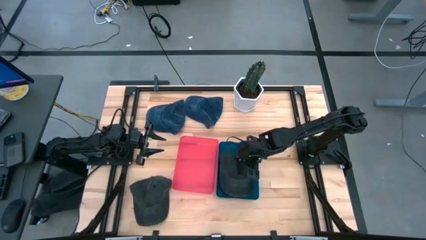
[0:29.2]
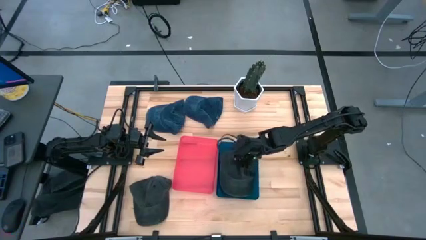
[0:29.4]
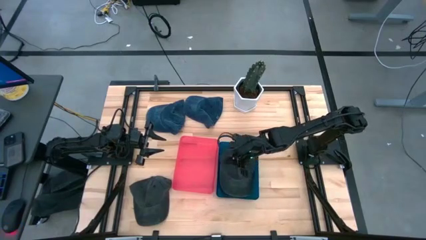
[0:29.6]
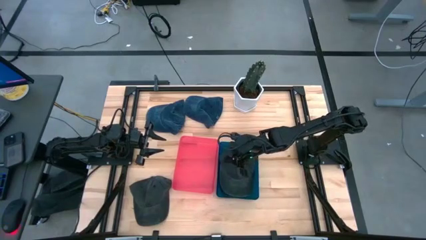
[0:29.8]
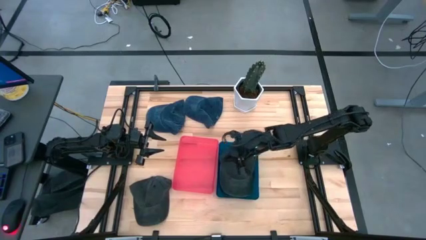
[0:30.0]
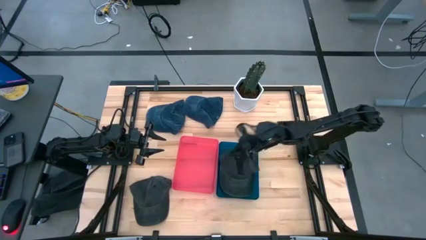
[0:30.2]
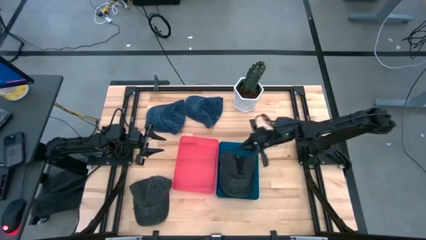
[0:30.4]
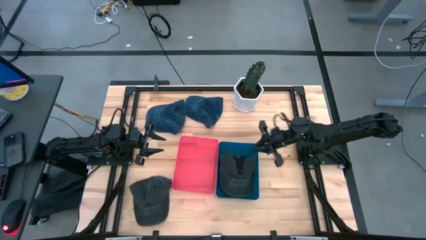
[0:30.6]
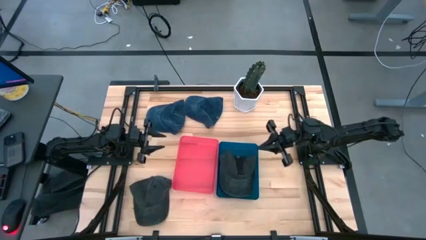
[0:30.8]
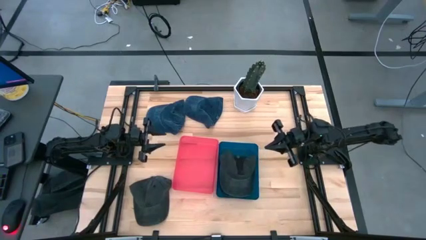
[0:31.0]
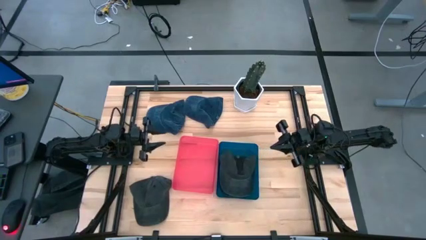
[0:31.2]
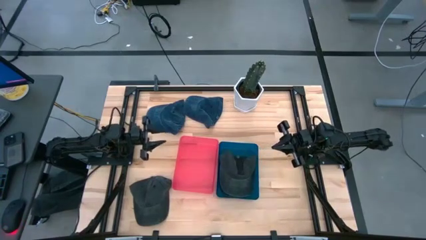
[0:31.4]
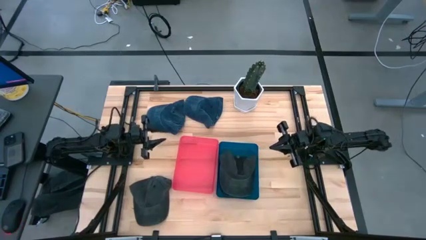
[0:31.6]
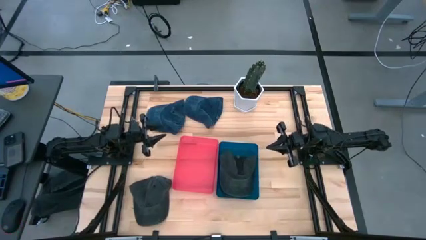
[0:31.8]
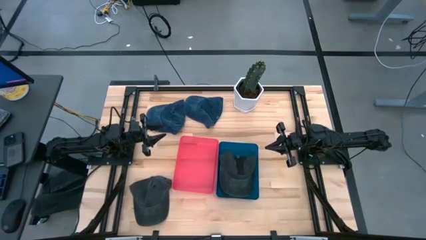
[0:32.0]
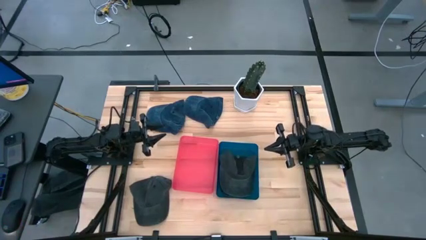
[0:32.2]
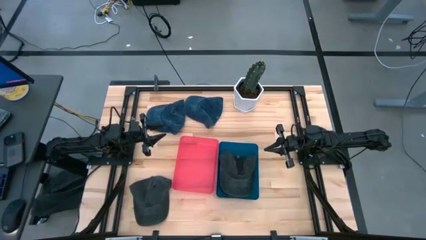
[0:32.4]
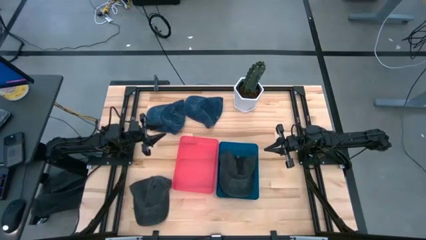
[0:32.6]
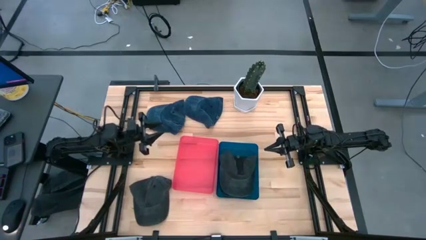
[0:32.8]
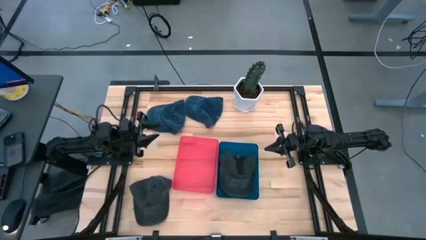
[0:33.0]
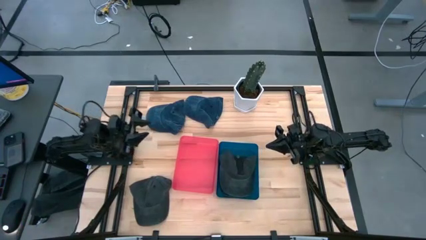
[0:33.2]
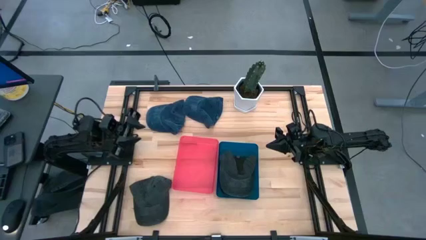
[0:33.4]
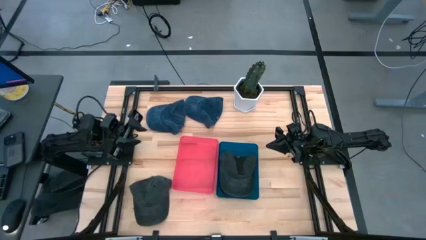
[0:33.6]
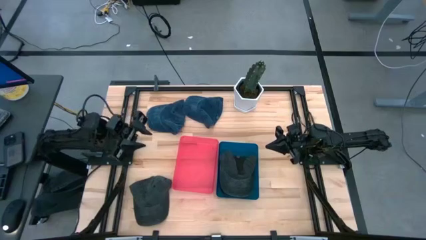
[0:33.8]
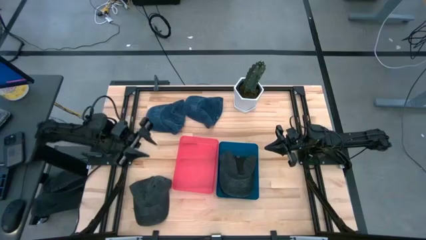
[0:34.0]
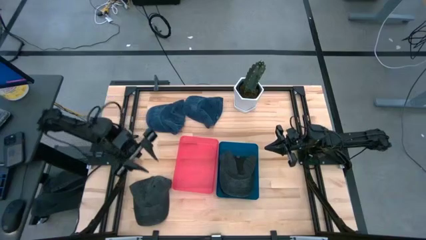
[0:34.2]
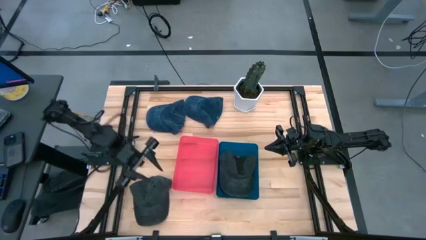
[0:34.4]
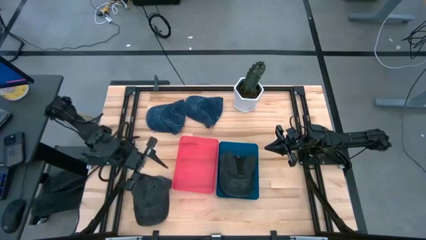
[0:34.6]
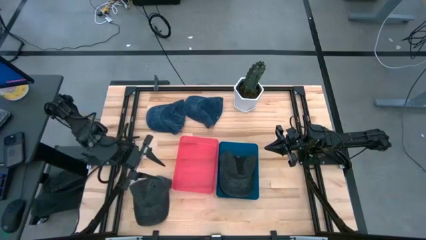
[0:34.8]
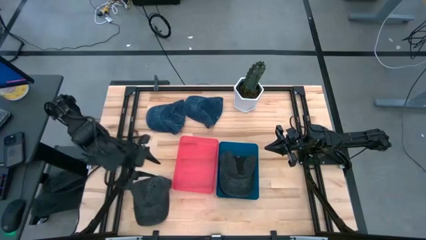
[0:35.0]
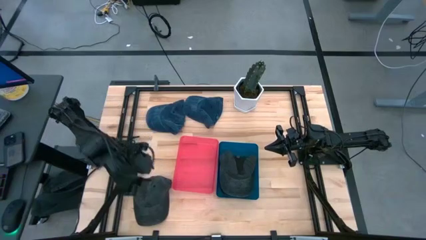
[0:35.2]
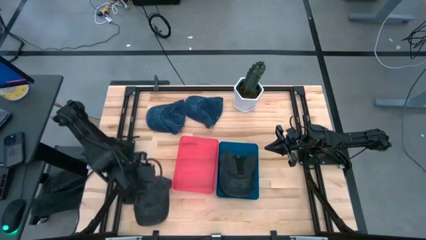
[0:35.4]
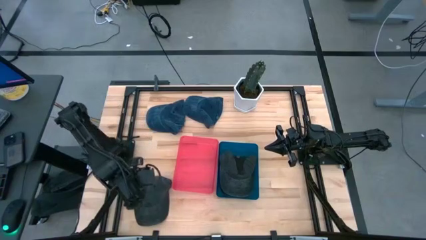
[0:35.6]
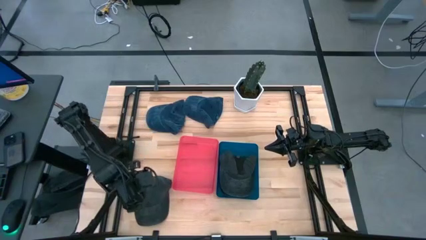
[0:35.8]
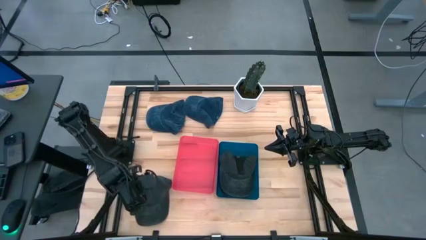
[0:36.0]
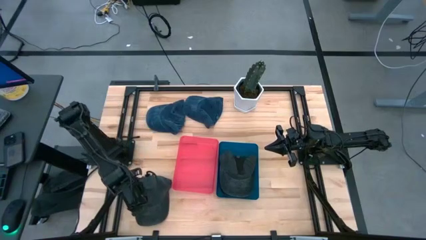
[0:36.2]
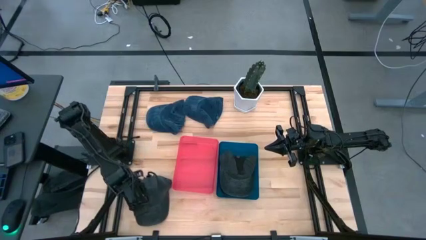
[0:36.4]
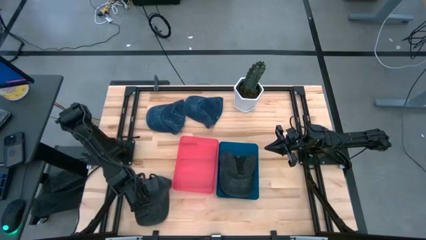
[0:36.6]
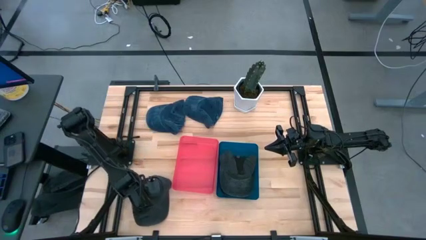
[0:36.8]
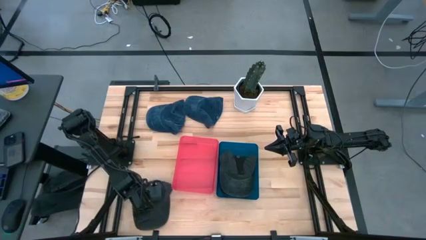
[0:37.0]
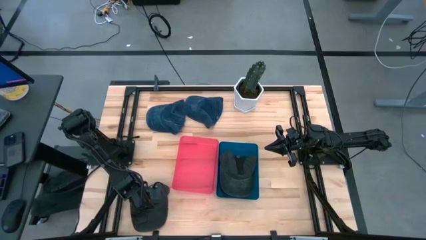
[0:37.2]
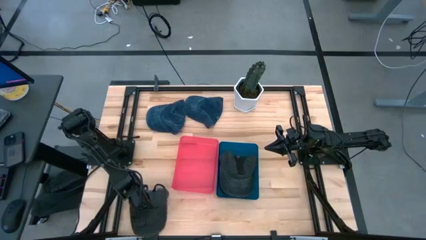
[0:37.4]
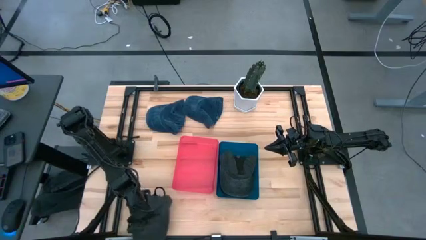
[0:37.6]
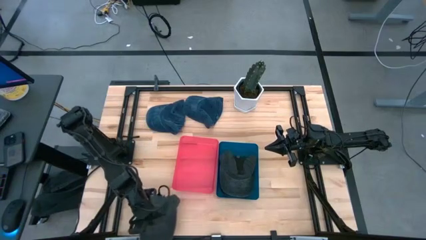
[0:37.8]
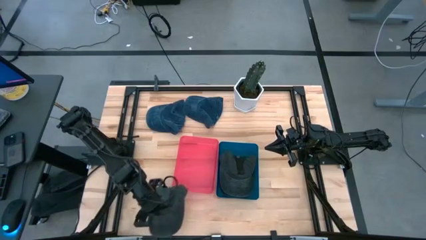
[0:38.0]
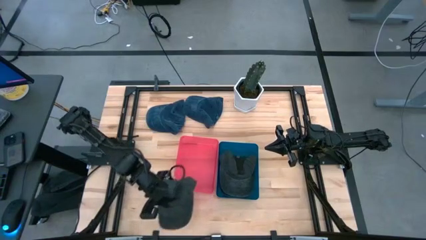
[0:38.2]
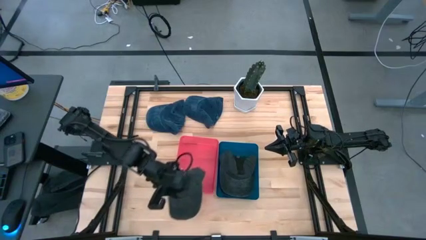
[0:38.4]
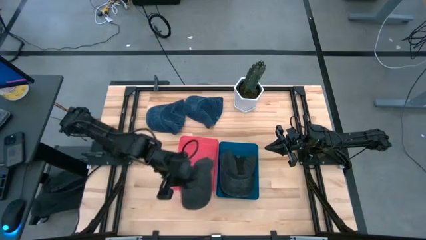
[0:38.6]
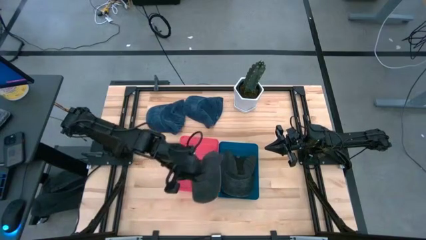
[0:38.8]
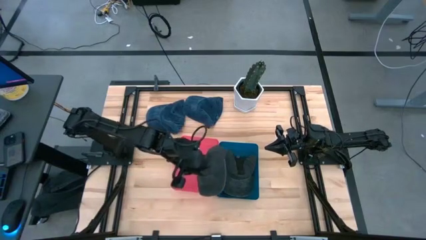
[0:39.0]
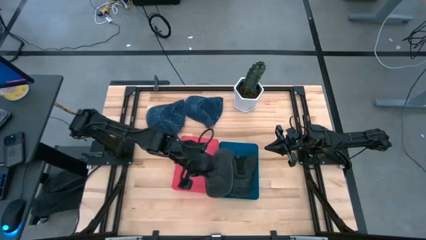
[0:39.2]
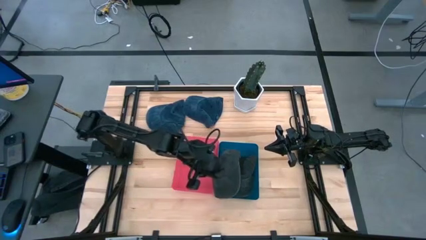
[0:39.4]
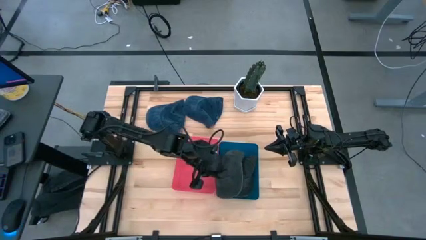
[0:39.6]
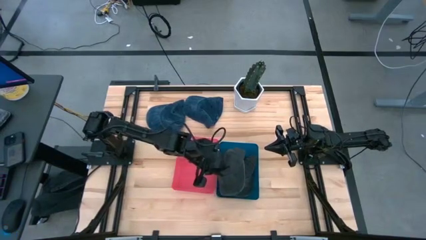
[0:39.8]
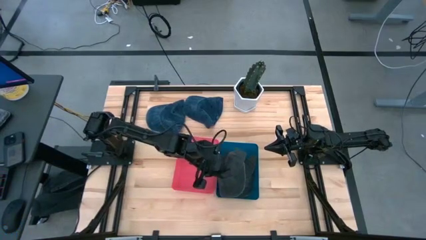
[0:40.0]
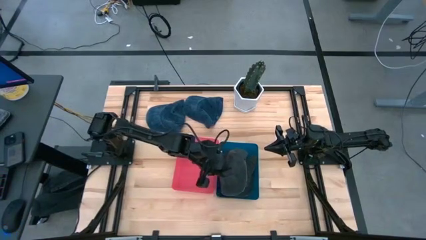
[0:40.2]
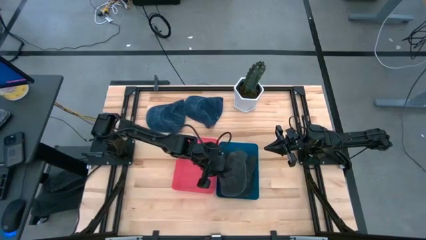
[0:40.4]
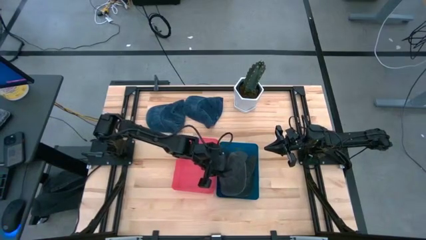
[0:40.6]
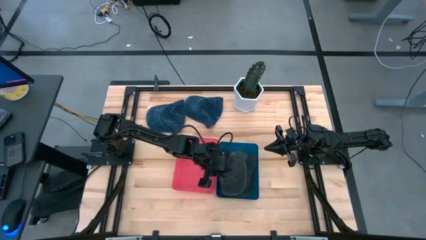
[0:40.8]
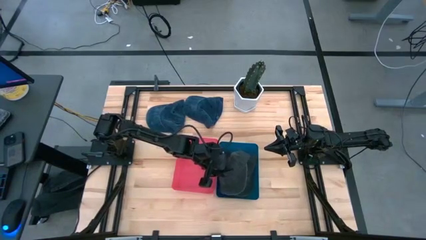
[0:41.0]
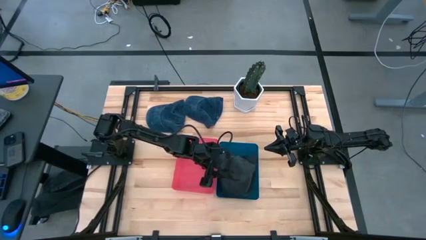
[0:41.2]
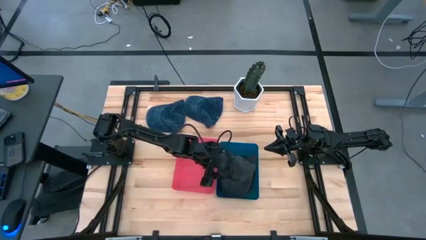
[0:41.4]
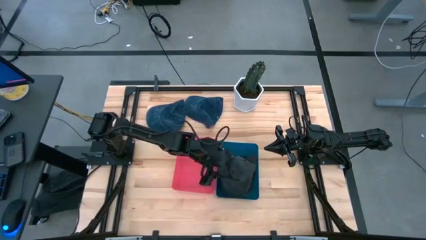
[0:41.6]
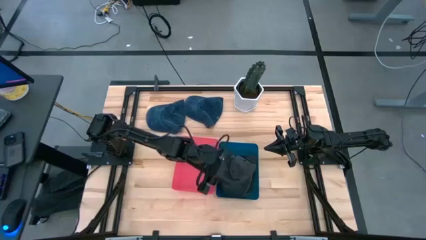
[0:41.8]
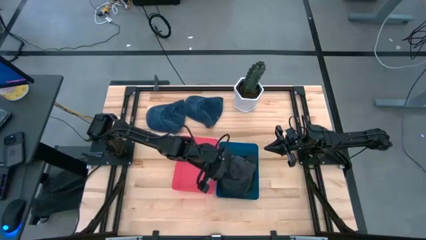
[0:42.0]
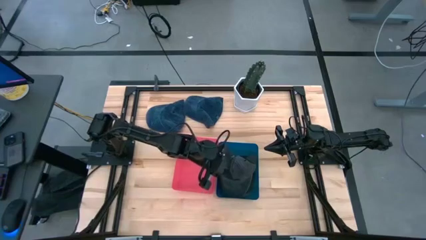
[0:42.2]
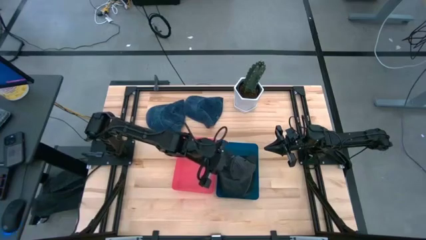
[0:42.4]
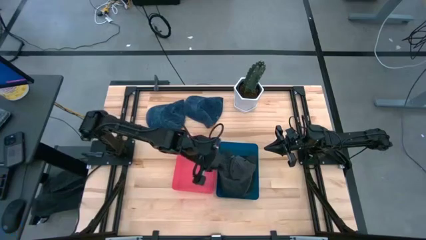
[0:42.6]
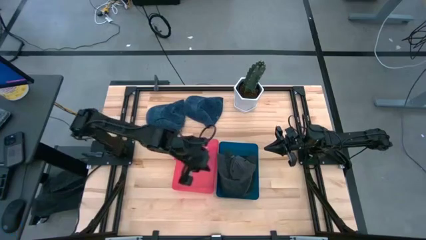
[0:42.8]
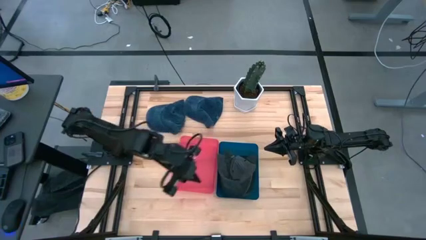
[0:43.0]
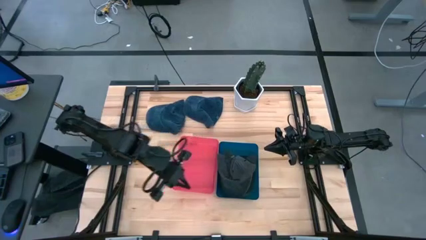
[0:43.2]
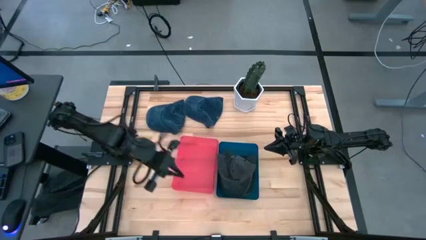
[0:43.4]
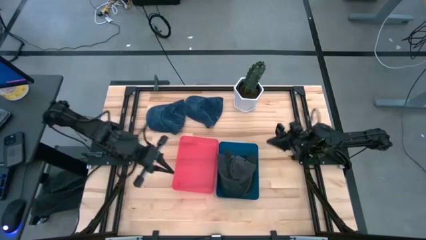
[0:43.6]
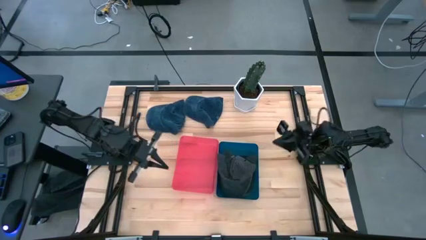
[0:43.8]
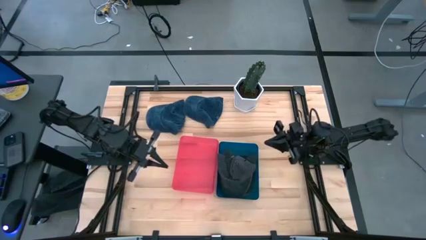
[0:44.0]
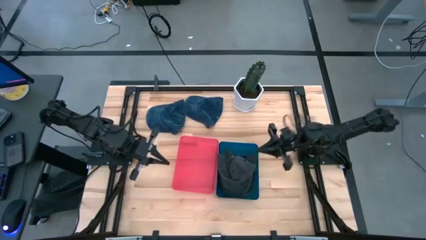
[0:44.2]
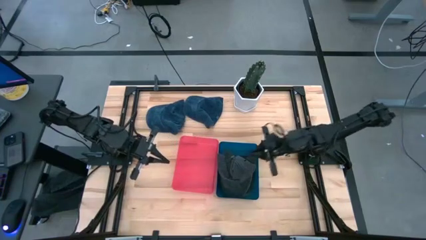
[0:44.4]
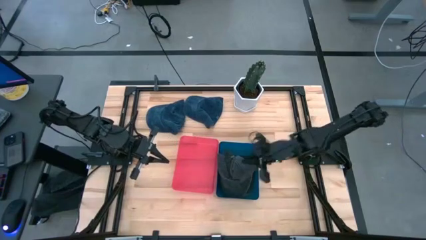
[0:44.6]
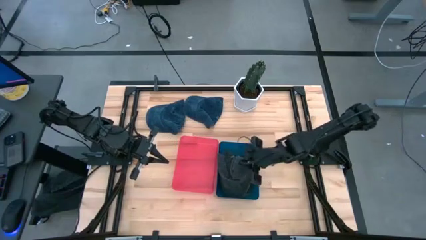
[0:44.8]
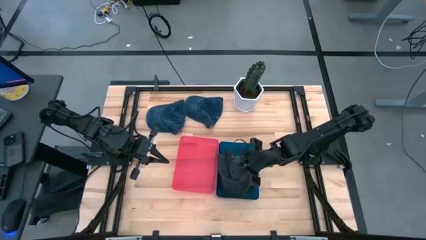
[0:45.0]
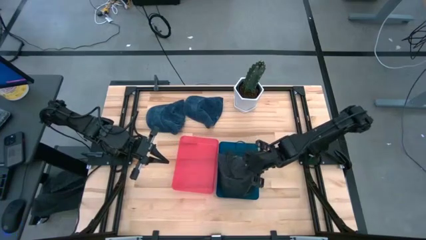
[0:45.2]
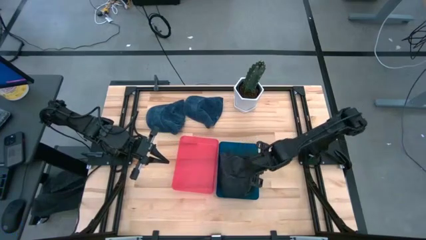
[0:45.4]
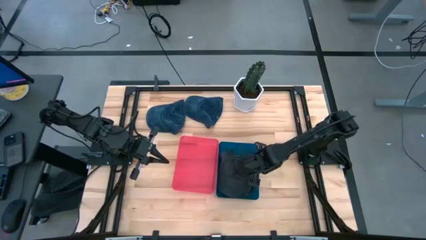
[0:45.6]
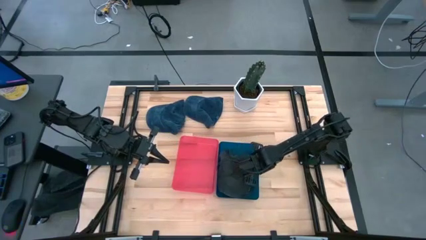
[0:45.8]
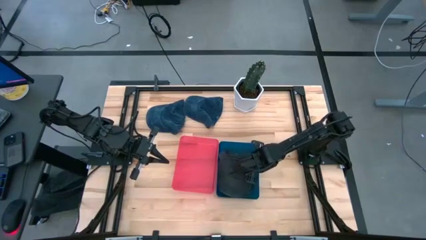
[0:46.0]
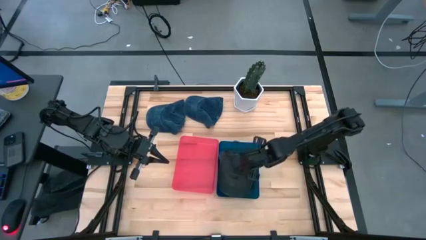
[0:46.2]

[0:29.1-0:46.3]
Task: Pick & Place hat
Put the black cap into the blue bin
